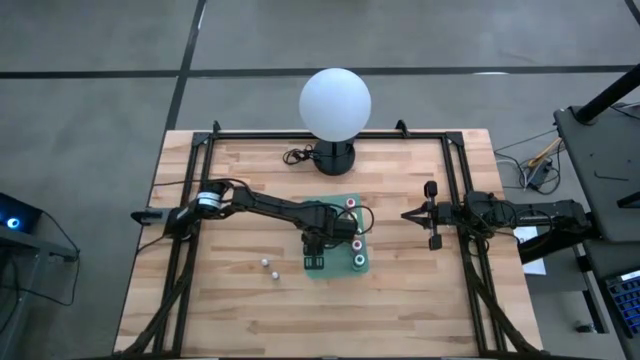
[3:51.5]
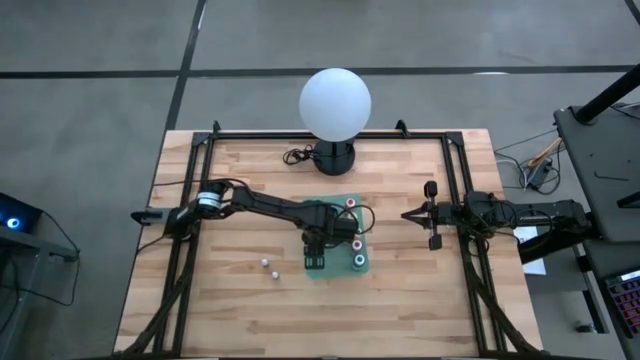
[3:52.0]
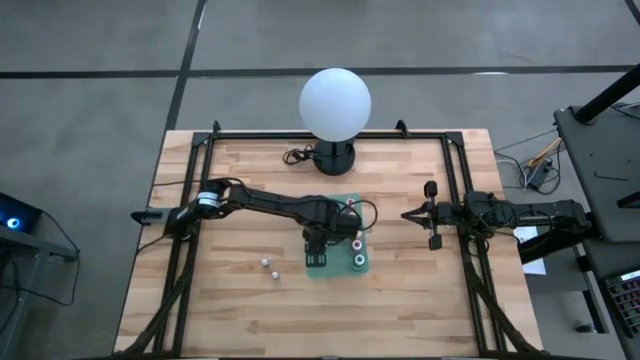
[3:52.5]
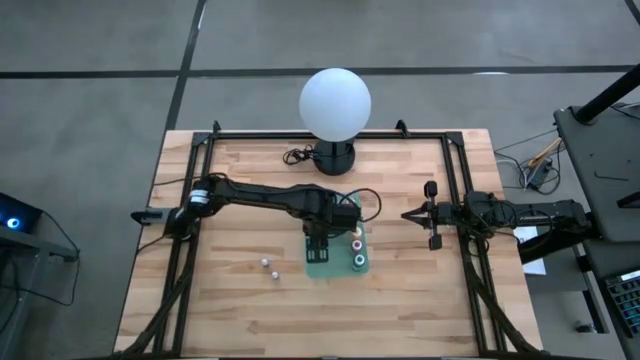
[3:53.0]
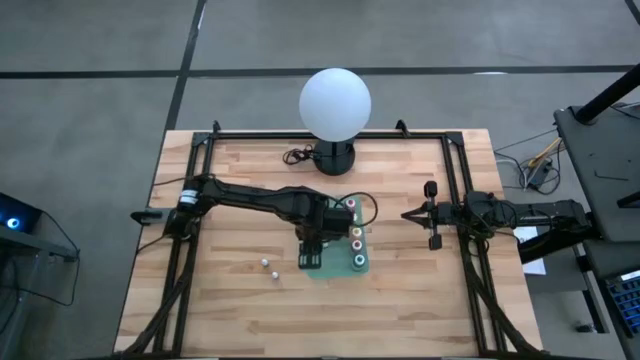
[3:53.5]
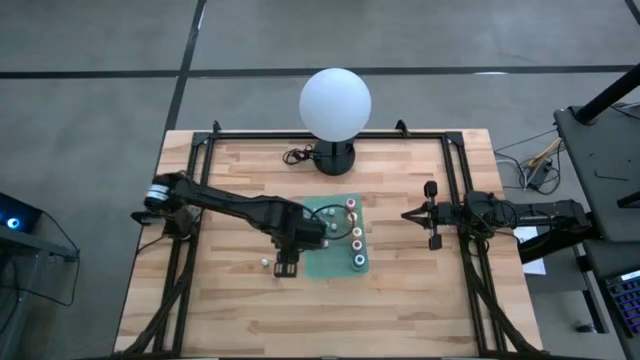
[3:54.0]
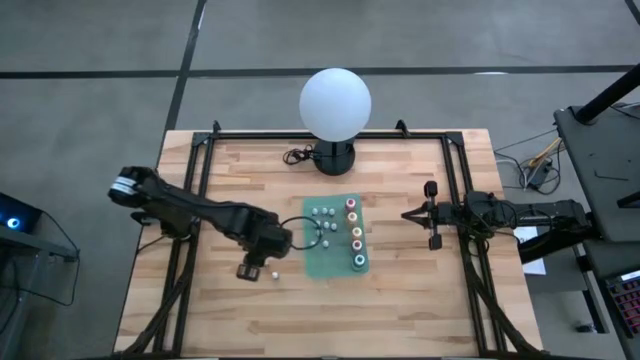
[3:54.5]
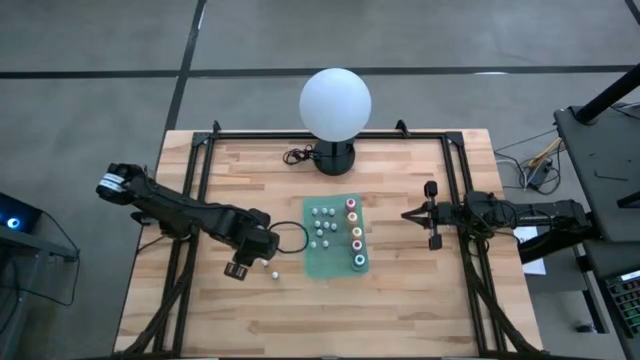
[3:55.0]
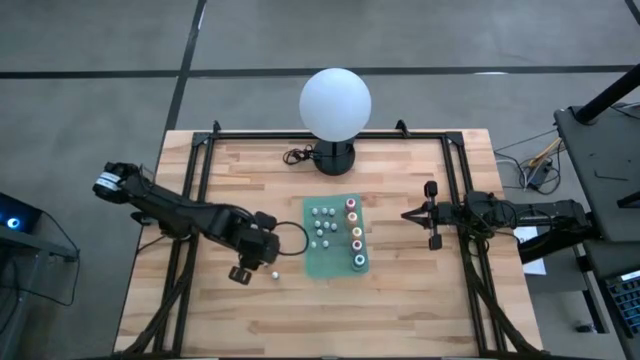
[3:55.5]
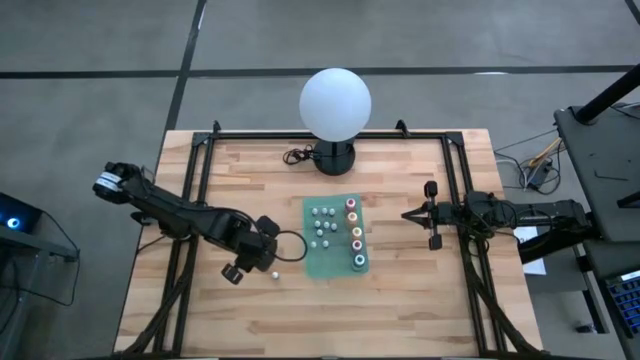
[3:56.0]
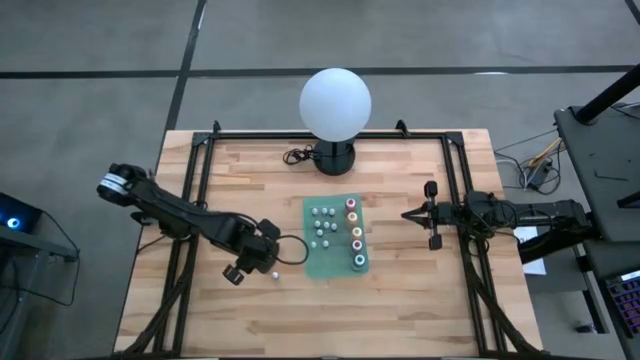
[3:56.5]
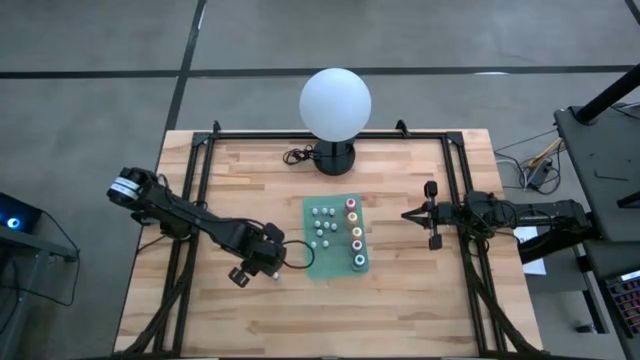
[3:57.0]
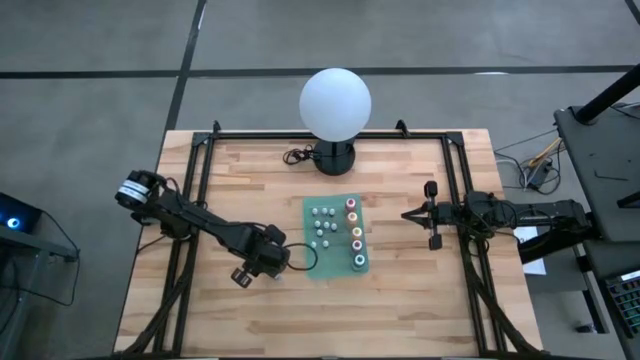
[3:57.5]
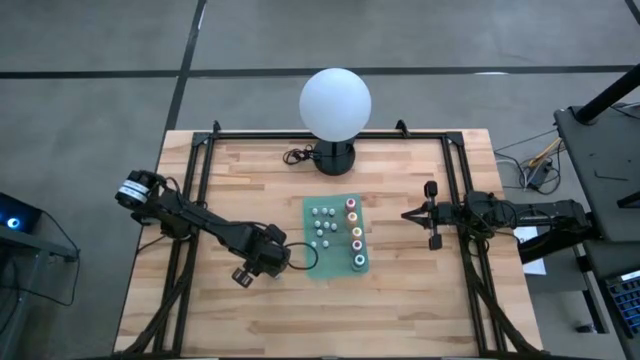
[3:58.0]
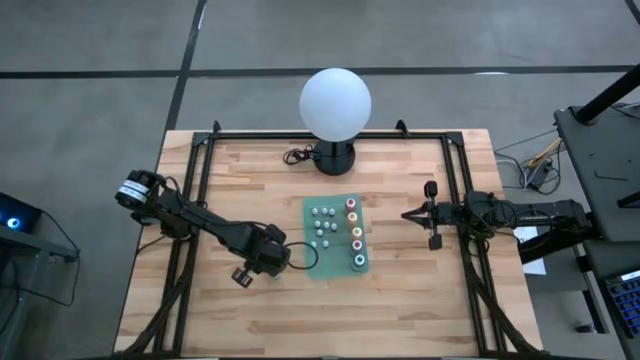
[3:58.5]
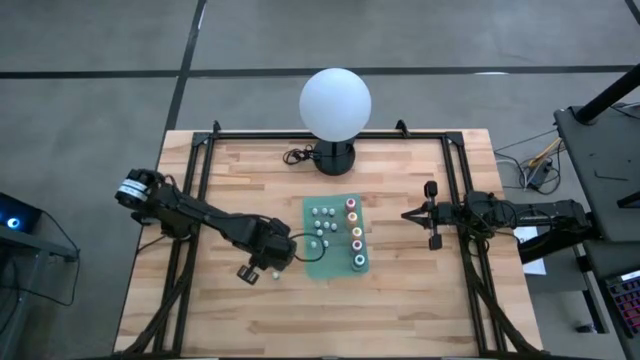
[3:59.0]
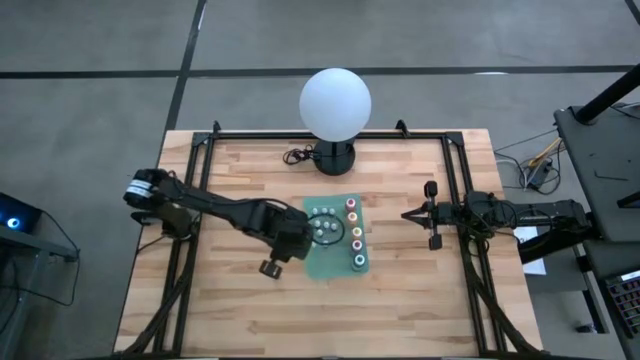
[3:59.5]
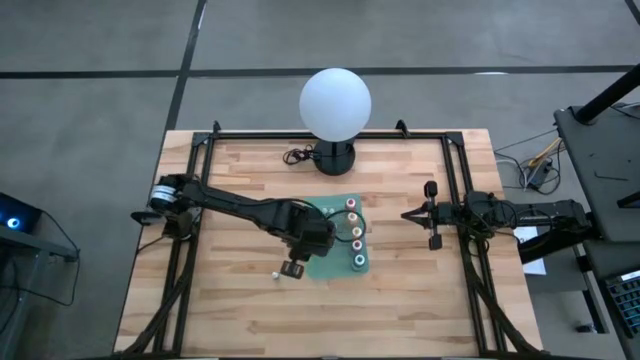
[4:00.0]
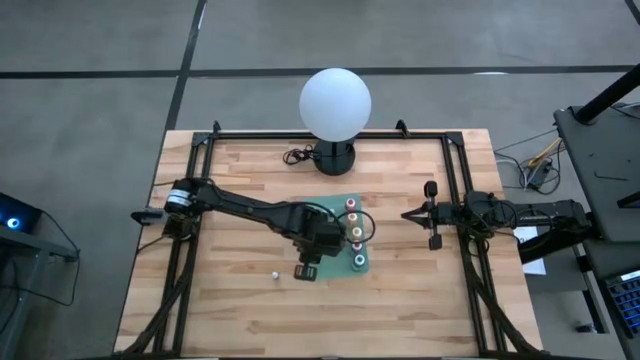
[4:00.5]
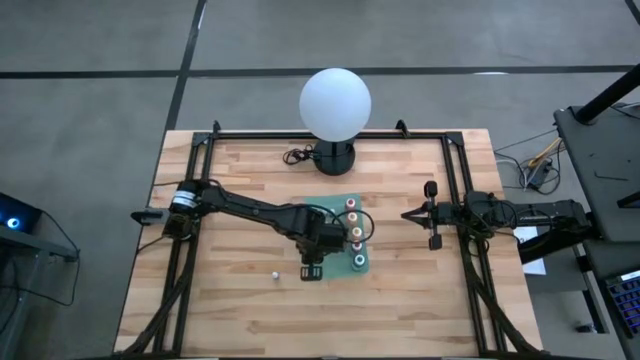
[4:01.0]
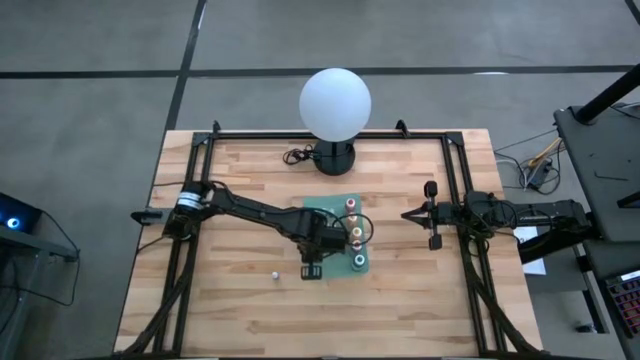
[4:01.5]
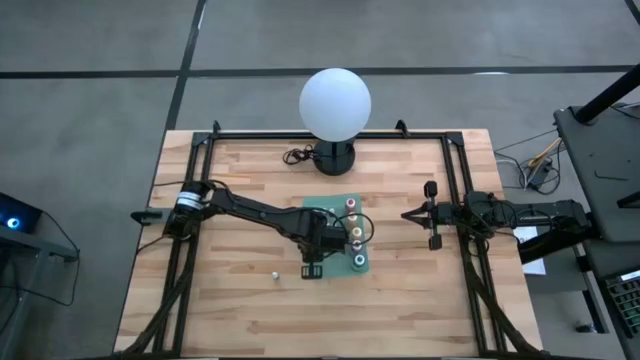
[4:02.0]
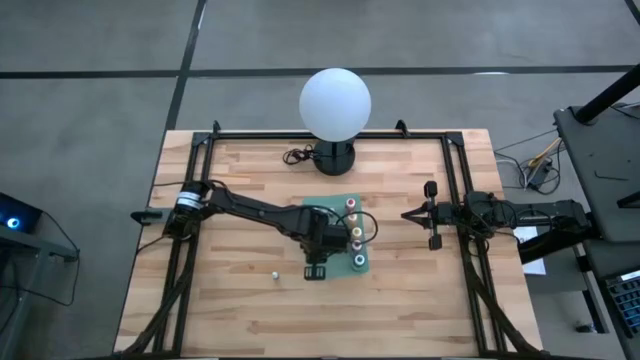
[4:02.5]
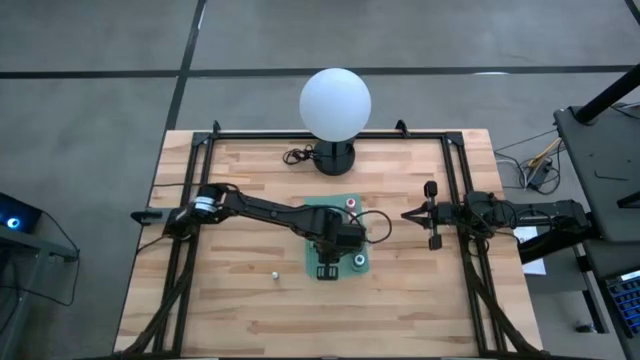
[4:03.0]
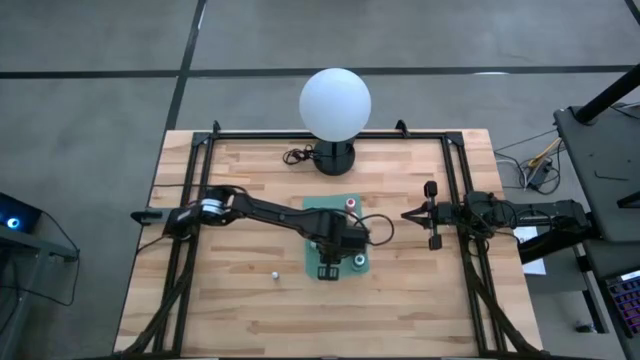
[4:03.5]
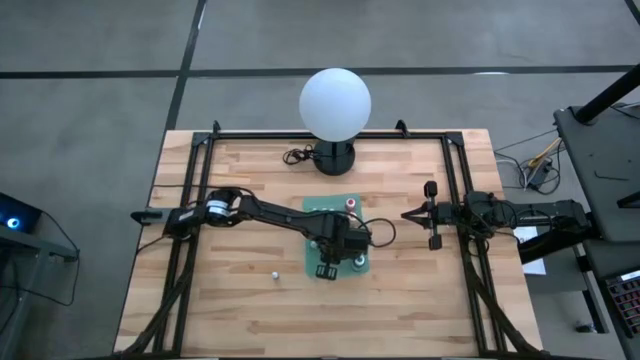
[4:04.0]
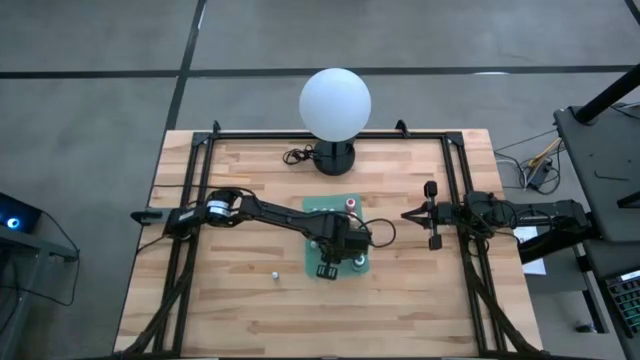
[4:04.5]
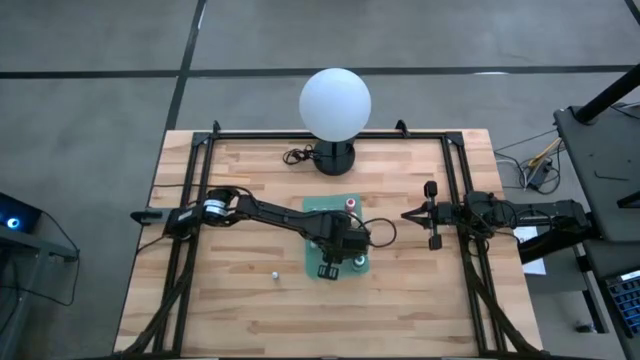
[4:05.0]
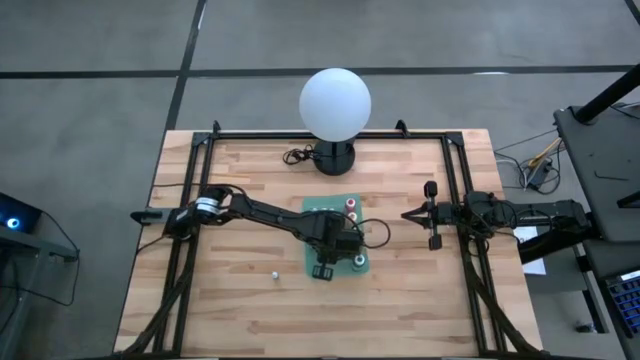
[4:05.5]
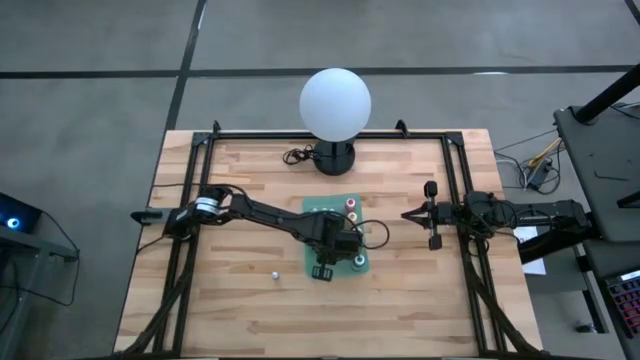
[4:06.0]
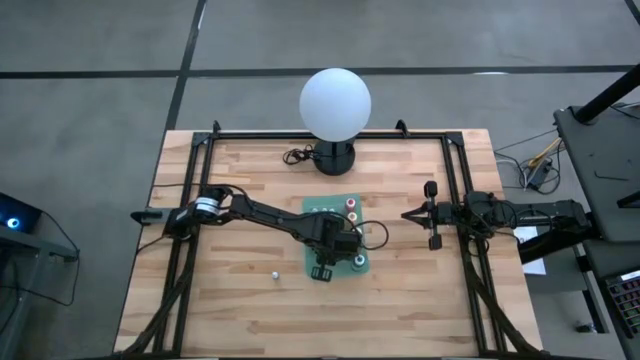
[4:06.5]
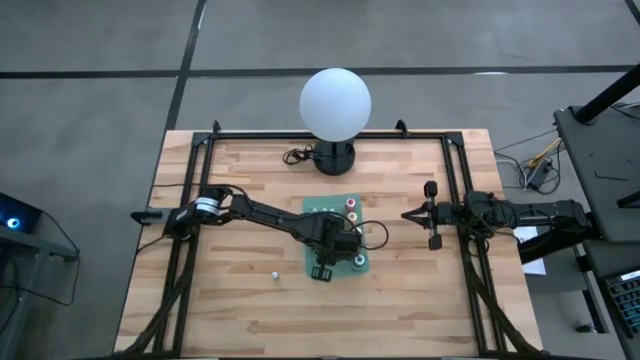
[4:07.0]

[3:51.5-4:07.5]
Task: Pick & Place food coloring
Put the top small green food coloring bottle into the green bin

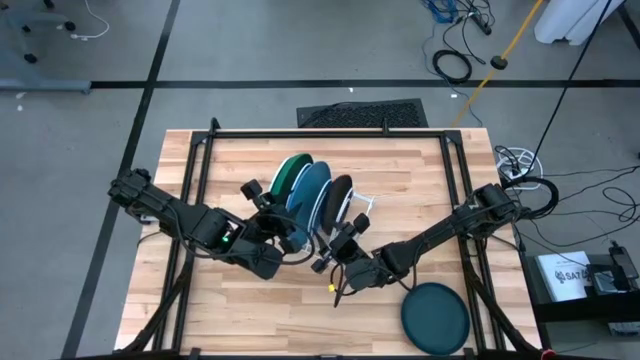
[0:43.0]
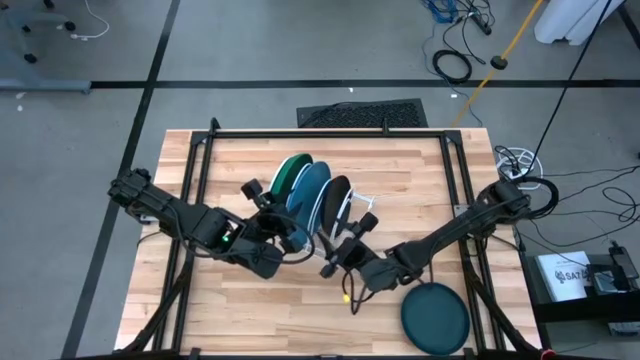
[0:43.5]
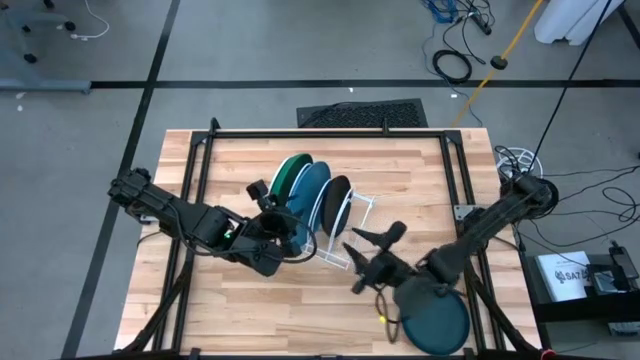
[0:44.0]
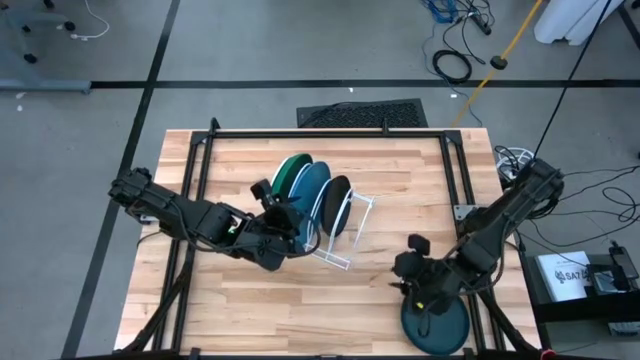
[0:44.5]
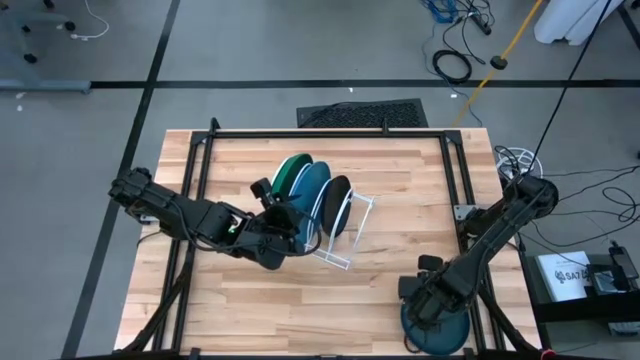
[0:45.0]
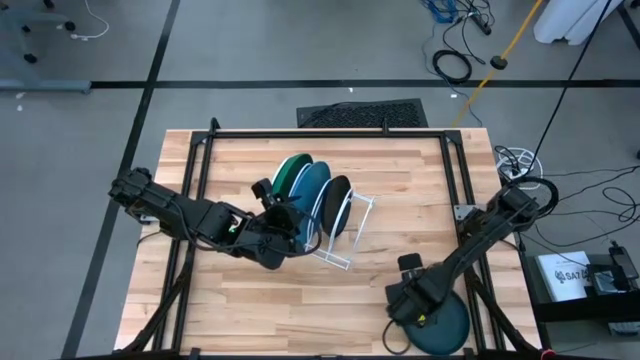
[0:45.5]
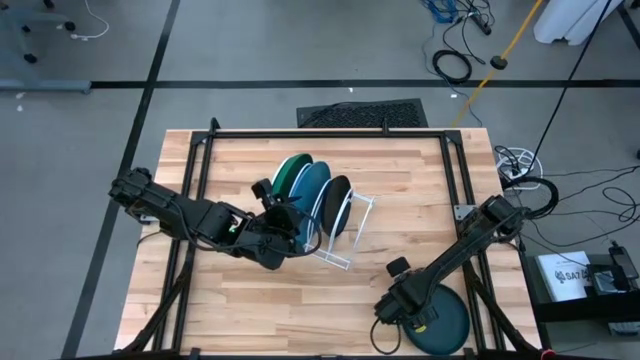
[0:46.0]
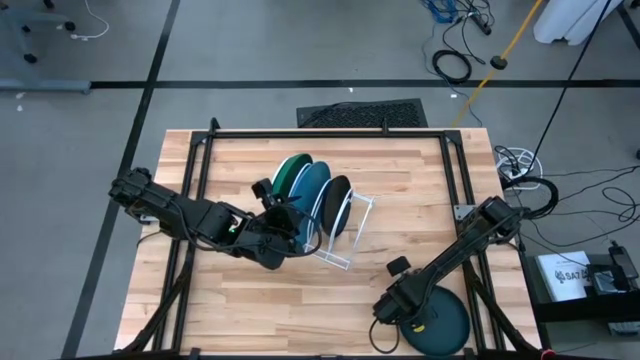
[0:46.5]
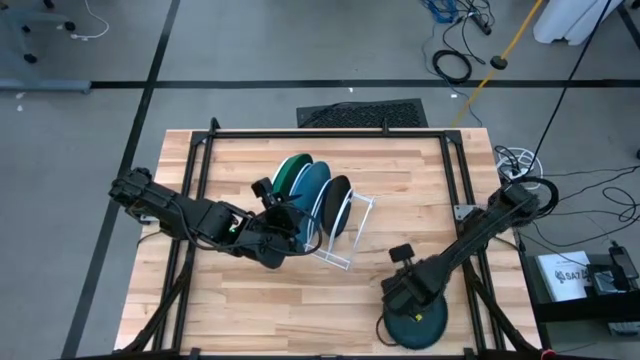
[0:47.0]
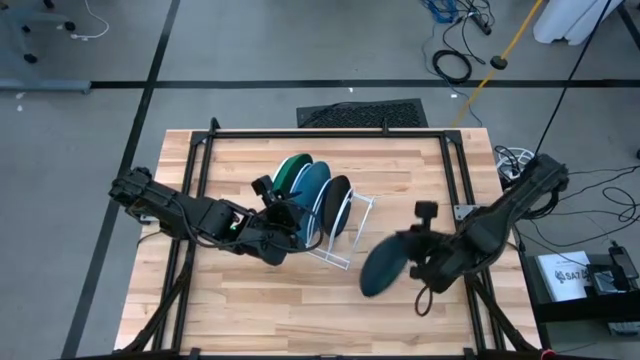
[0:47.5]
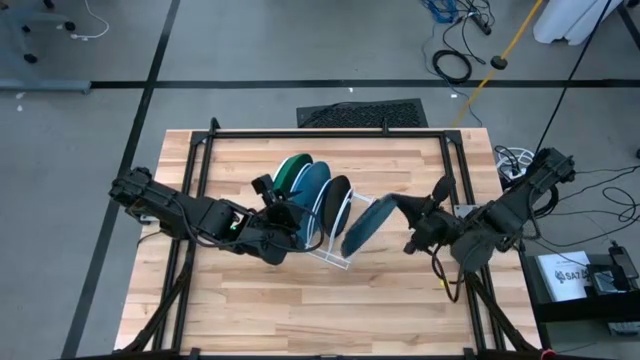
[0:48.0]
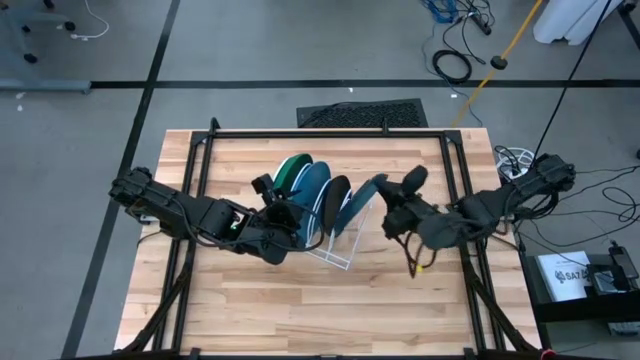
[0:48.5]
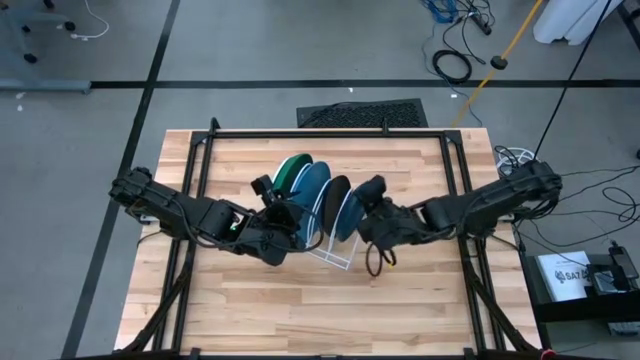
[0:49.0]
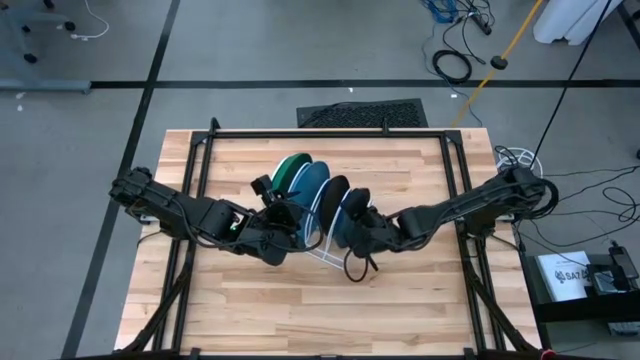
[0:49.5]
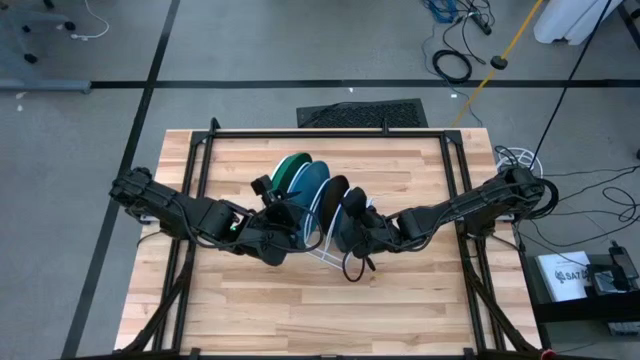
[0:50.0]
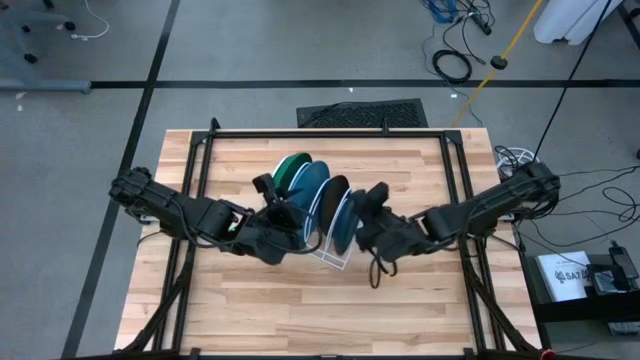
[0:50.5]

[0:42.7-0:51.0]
Task: Sort dishes
Put the dark blue plate in the dish rack
